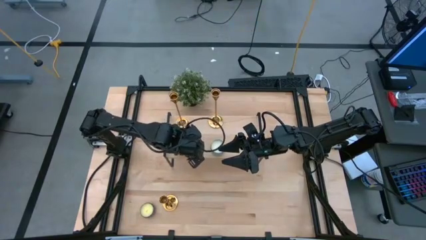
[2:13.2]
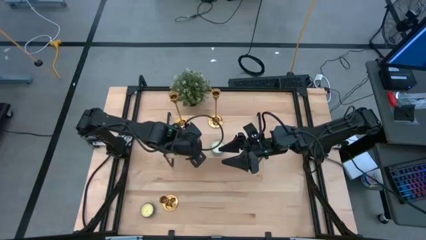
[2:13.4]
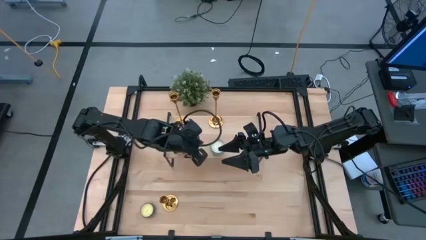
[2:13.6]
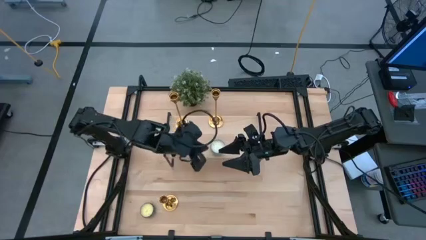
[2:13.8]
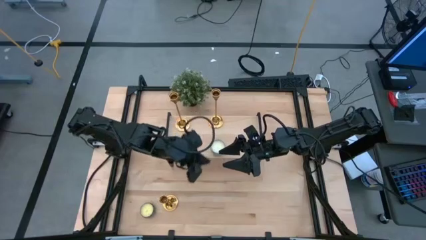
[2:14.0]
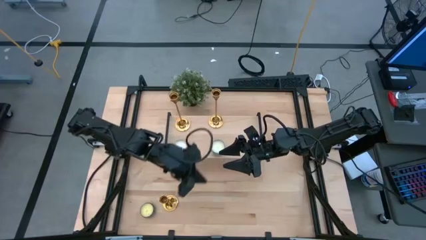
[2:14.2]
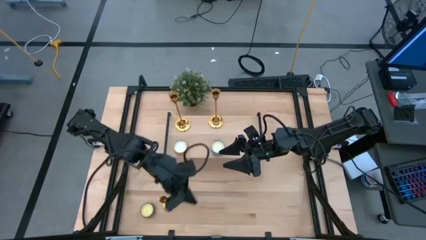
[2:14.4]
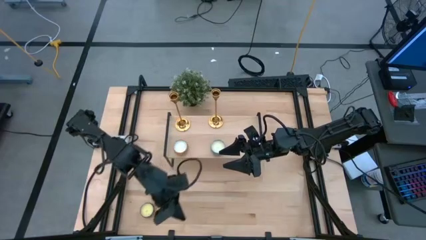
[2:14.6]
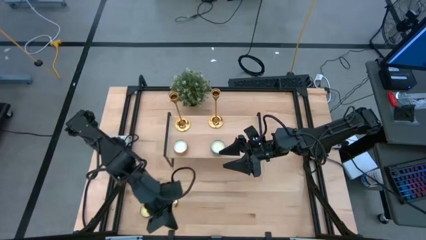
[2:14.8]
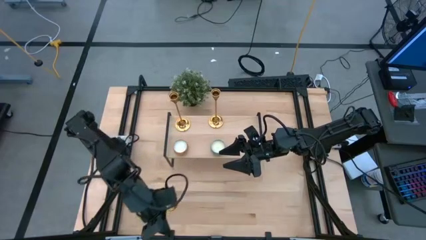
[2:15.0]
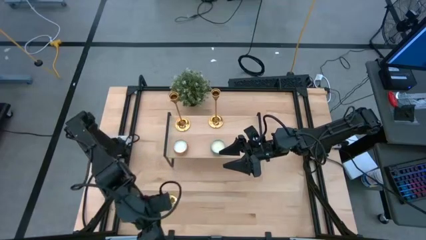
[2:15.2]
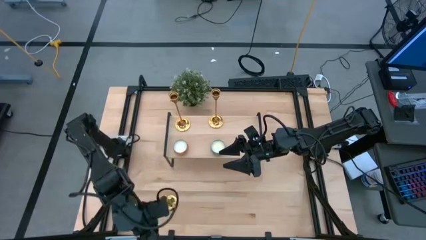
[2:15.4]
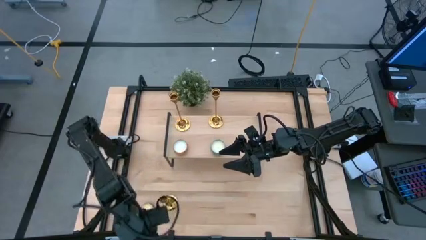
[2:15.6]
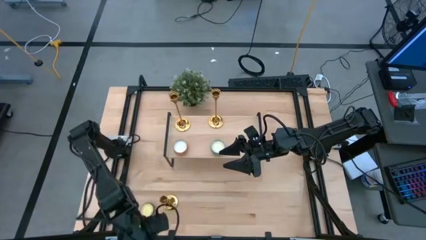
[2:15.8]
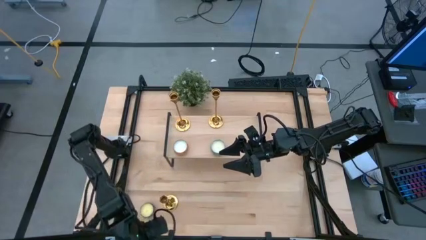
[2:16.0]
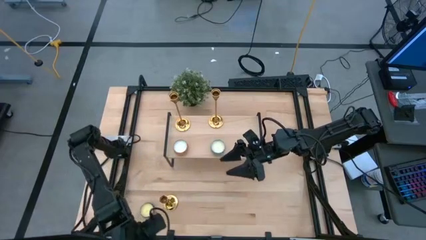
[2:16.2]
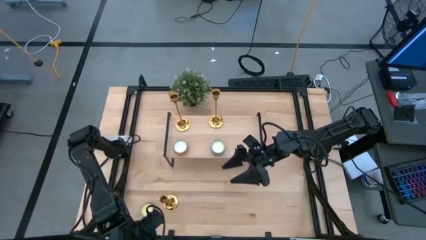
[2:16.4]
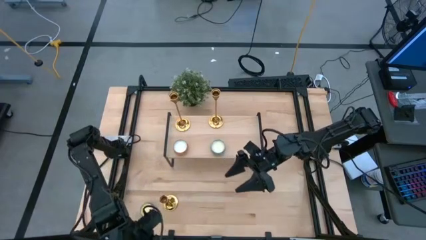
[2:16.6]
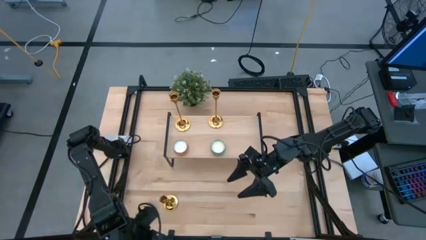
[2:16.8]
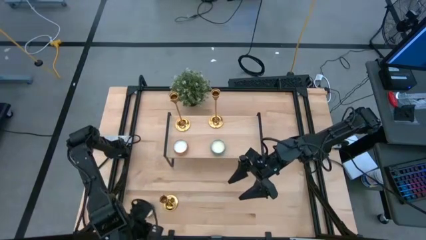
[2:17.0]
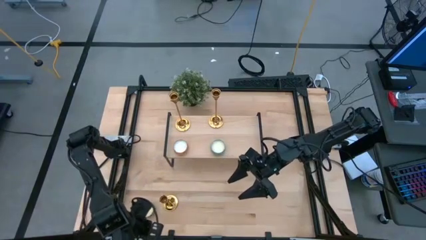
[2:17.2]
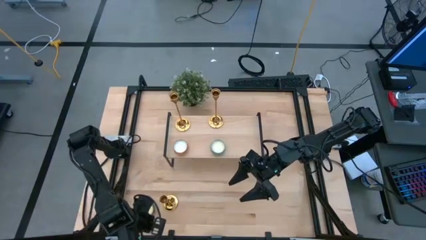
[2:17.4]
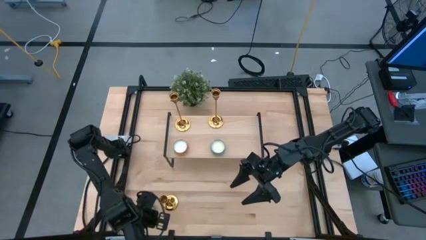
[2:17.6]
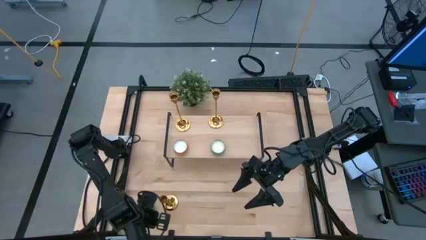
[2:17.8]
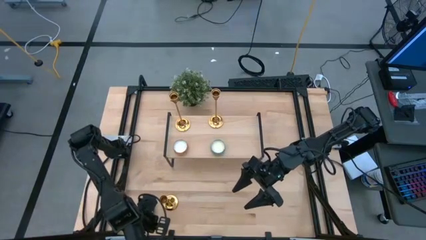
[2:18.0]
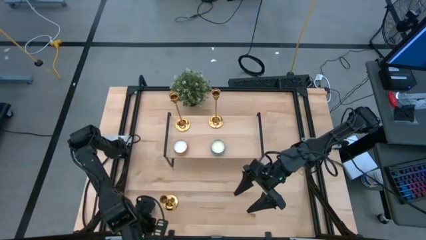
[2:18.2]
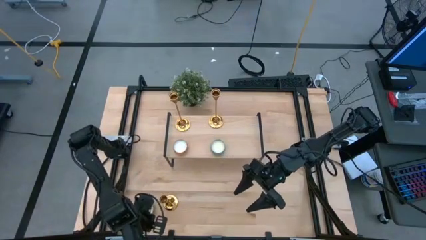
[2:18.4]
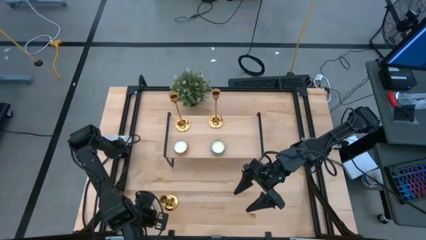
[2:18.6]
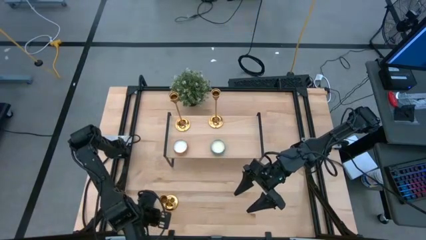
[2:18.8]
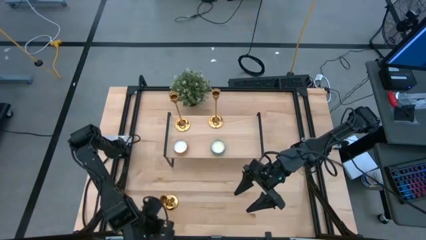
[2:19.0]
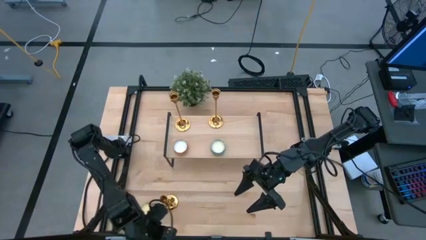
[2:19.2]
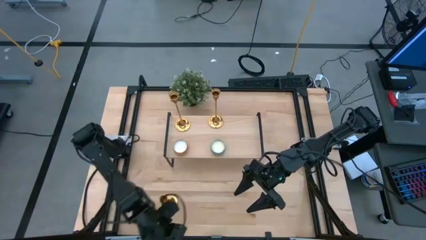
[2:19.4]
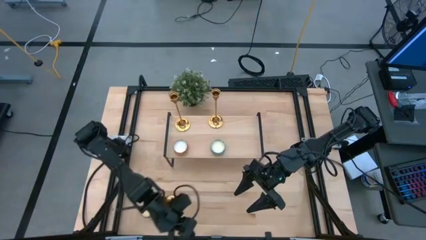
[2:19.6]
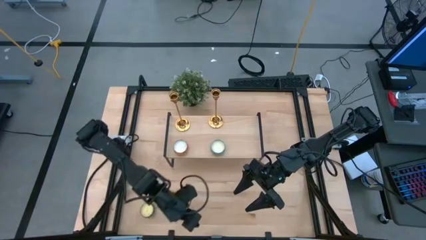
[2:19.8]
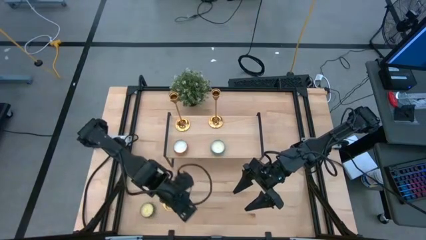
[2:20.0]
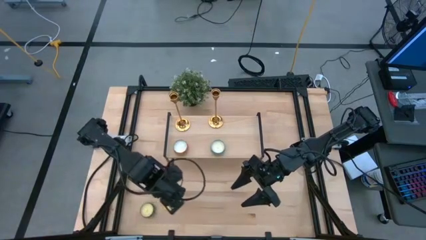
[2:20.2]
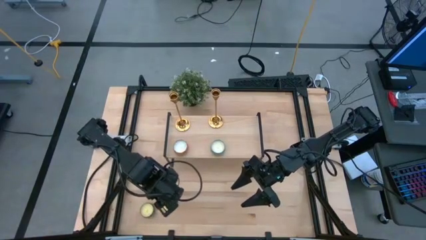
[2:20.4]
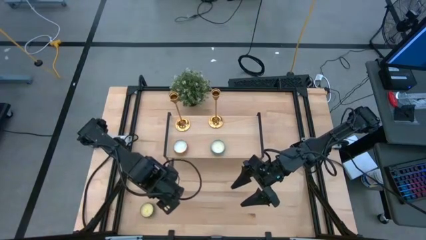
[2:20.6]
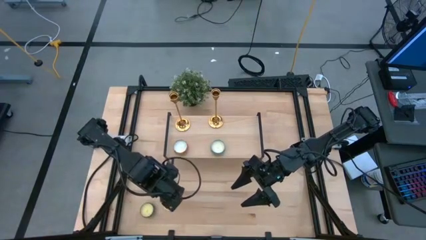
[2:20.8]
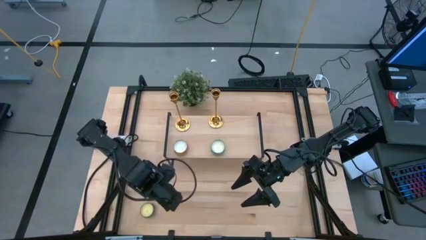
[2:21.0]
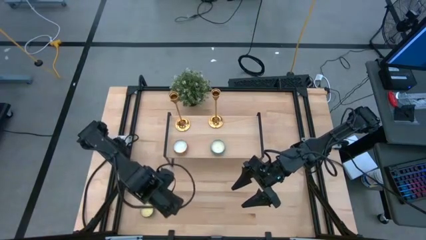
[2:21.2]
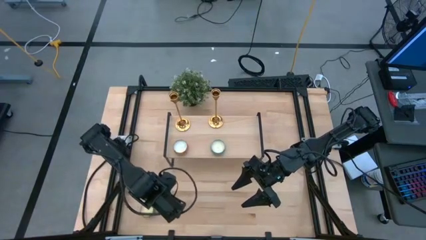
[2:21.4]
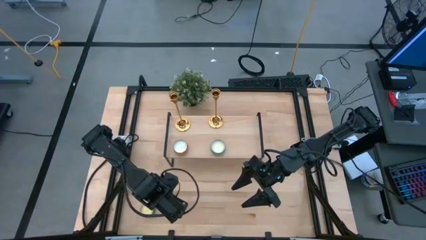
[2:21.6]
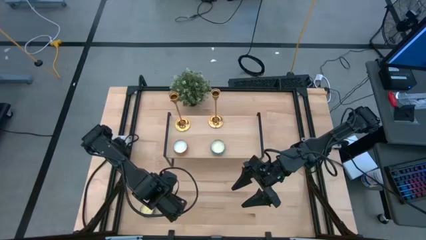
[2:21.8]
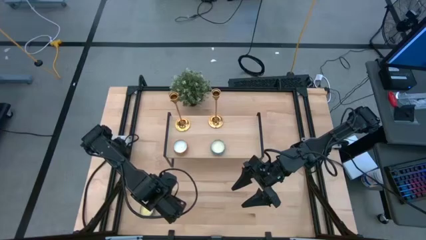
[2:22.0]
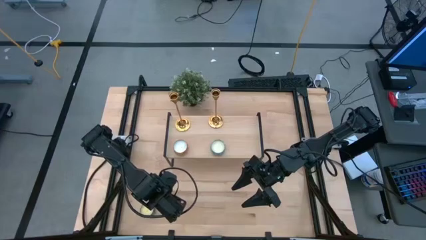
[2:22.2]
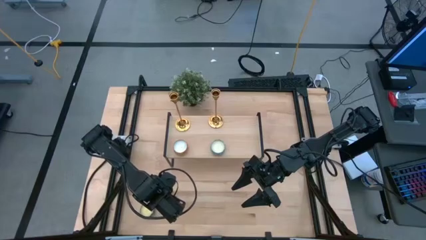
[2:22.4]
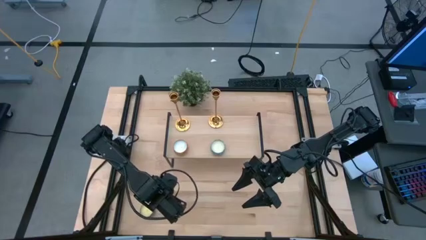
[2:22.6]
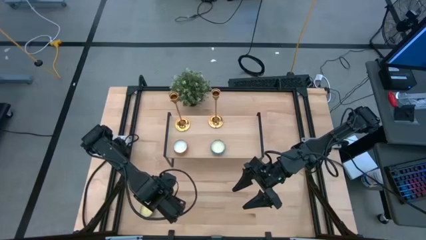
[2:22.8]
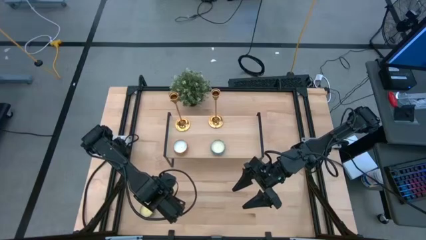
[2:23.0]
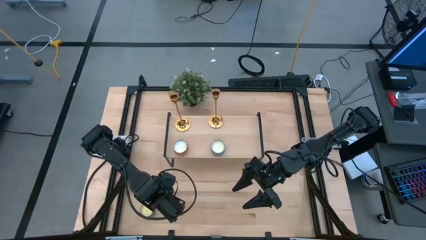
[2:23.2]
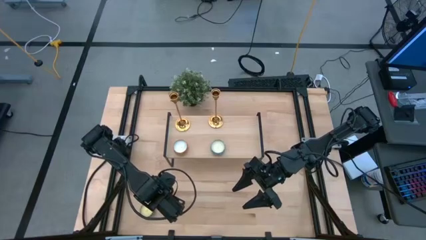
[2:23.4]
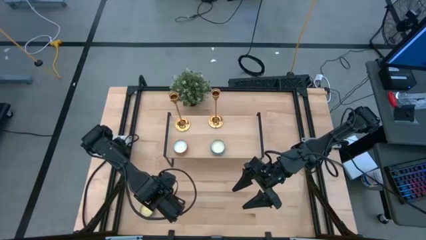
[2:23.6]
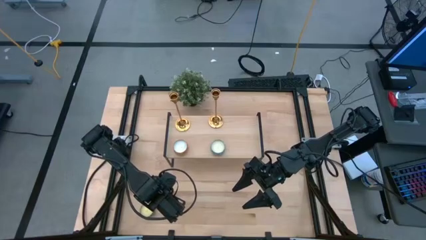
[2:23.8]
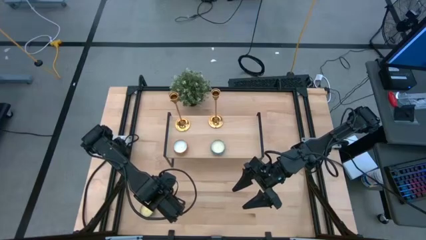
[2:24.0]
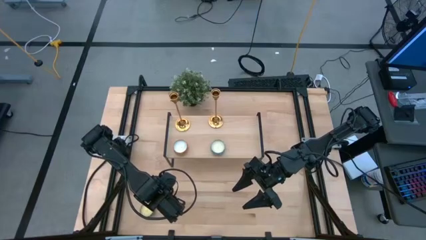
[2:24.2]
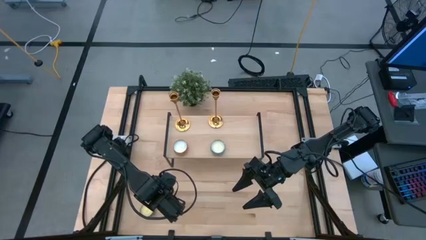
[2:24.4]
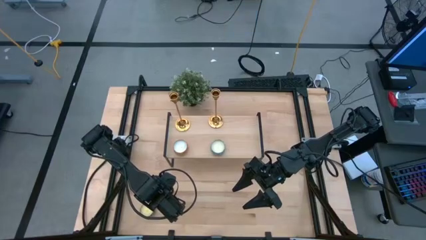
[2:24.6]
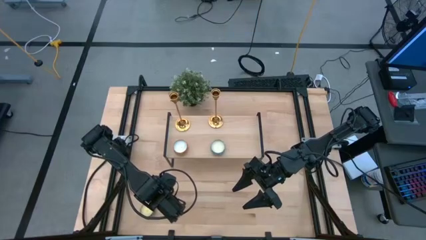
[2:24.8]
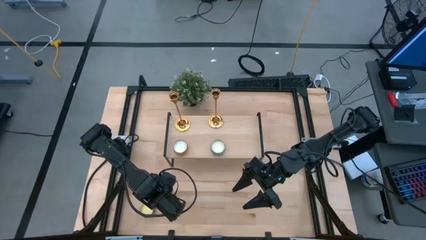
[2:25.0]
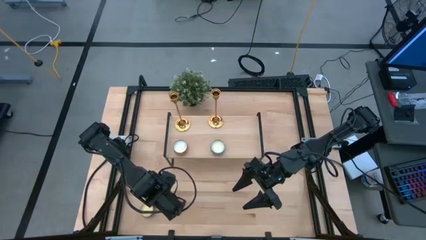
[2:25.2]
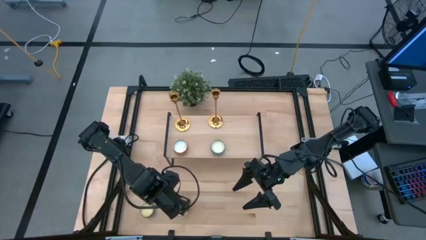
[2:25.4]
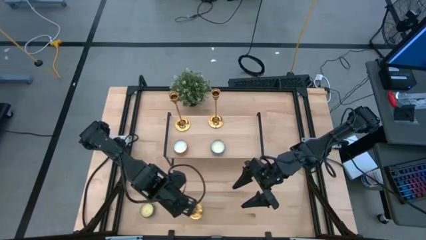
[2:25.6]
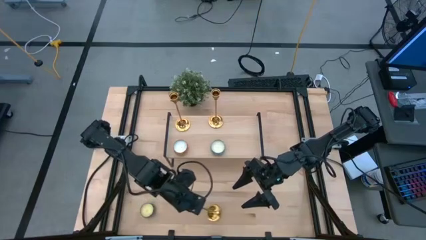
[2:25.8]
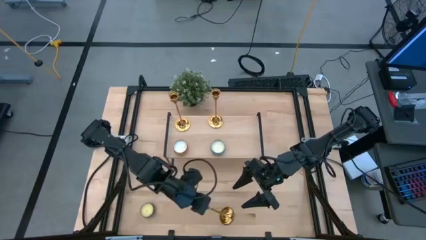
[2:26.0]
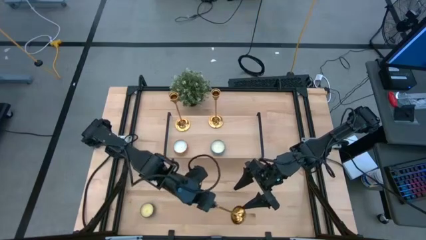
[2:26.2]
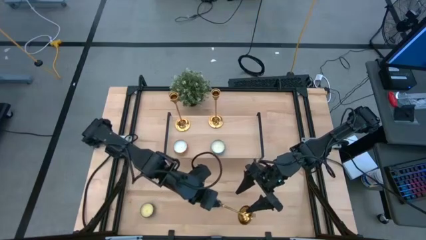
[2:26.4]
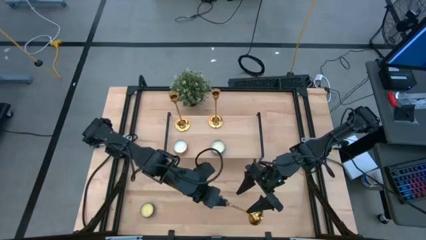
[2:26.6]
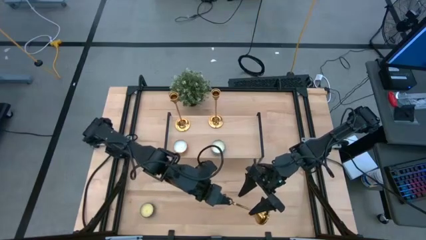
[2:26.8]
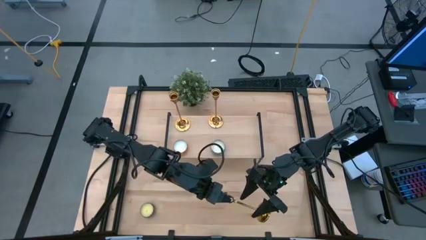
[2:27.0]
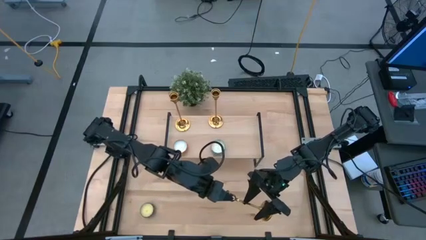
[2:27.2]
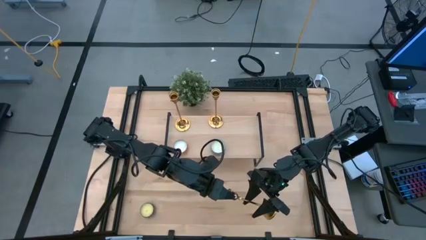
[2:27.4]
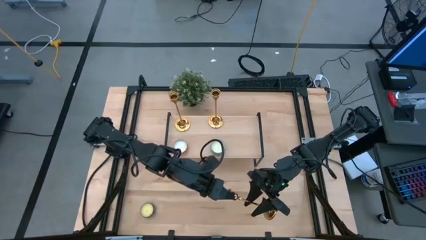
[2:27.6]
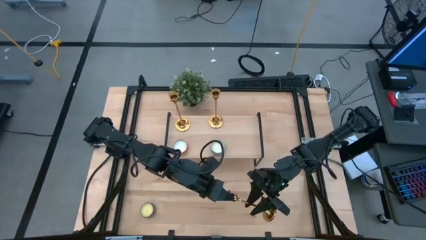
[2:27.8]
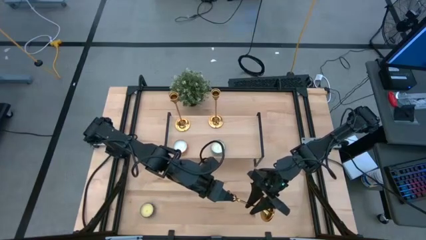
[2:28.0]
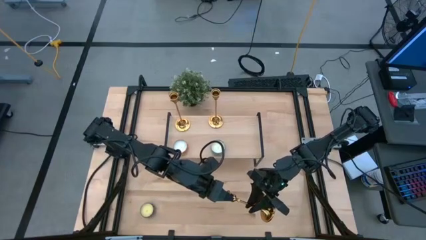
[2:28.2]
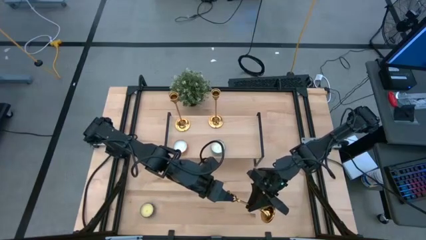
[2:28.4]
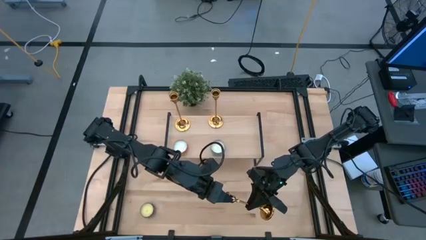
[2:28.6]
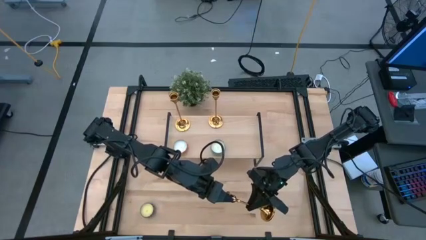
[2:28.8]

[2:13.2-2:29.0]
Task: Stock candles and holders on shelf
Align the gold candle holder with the other gold candle holders on the shelf
